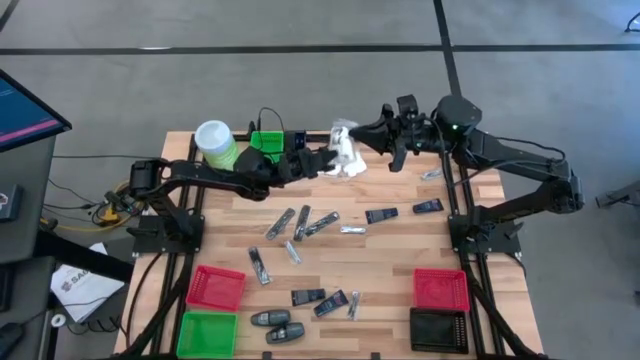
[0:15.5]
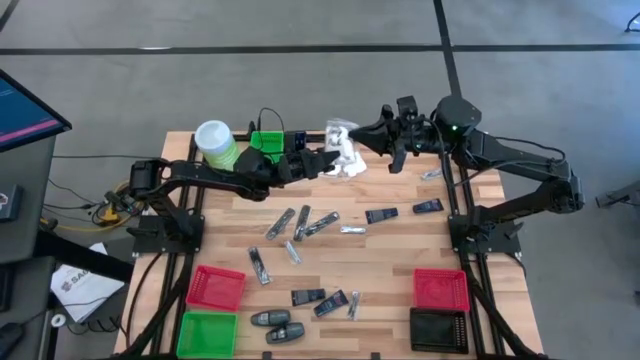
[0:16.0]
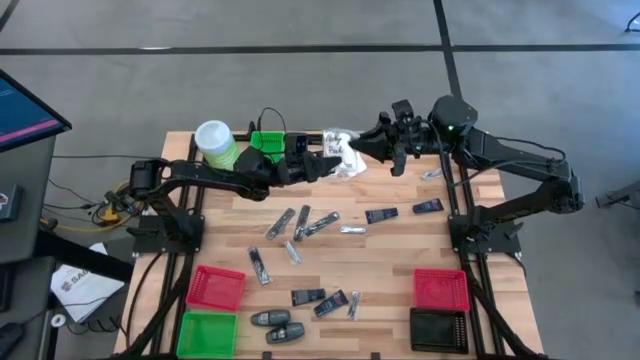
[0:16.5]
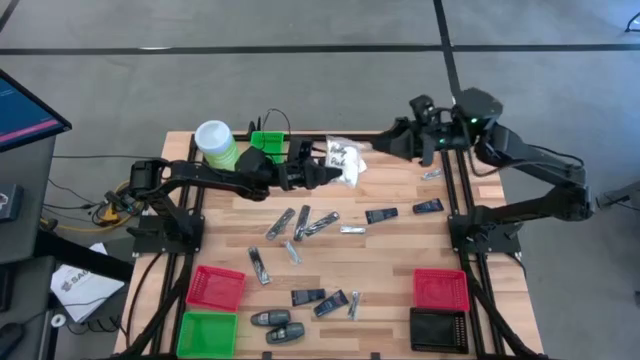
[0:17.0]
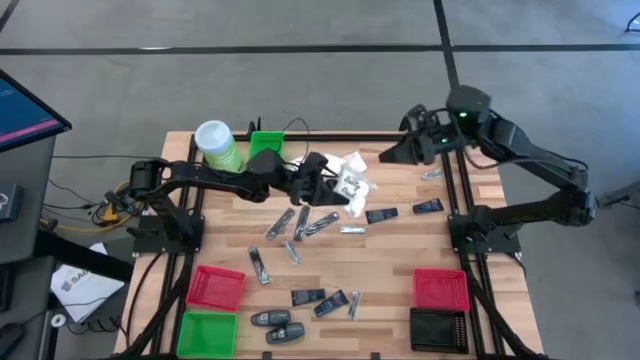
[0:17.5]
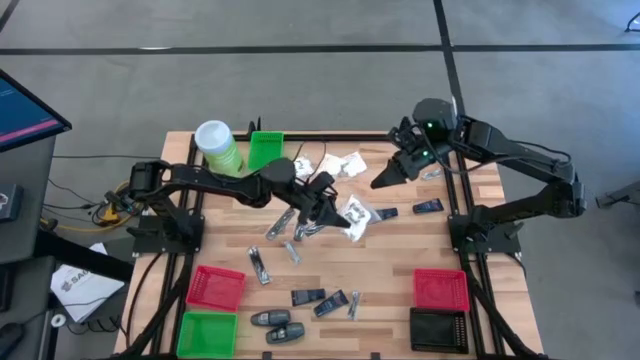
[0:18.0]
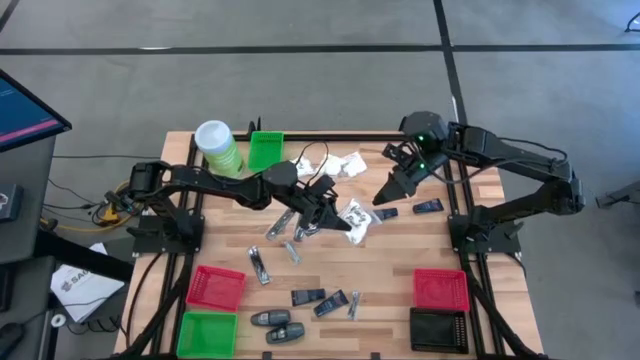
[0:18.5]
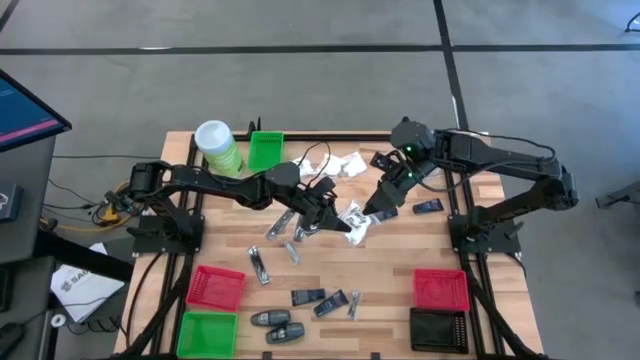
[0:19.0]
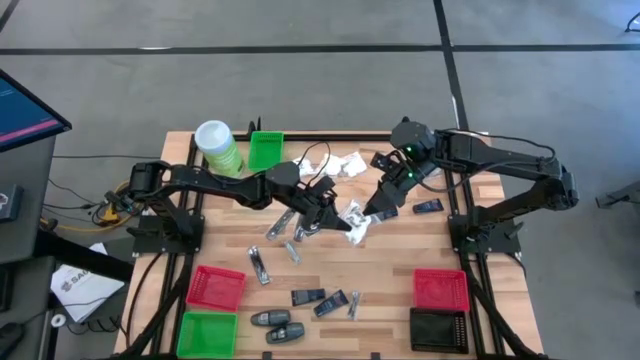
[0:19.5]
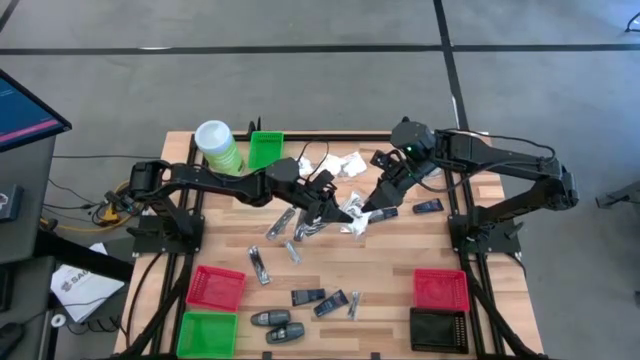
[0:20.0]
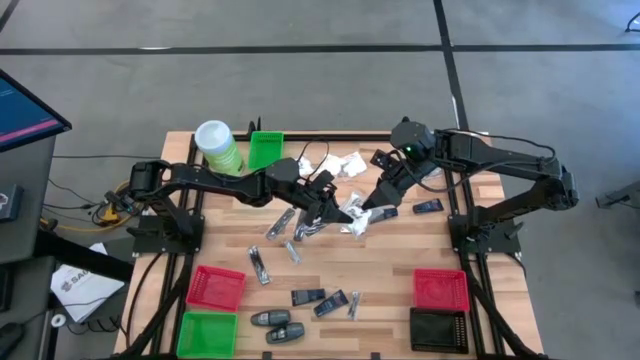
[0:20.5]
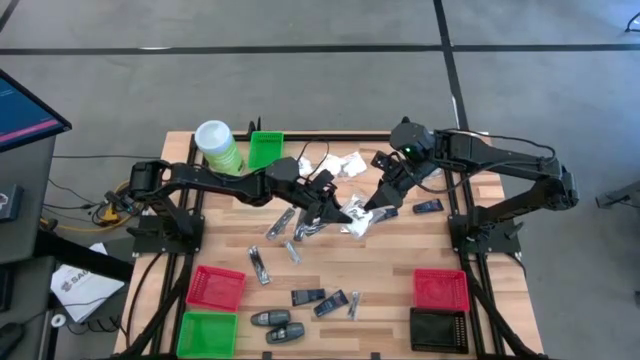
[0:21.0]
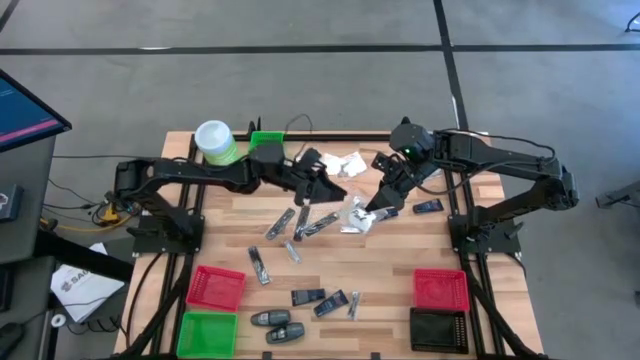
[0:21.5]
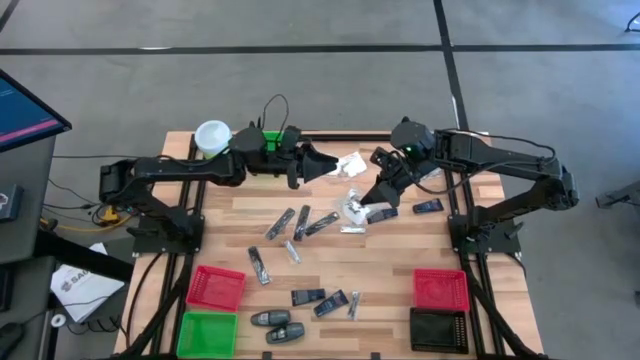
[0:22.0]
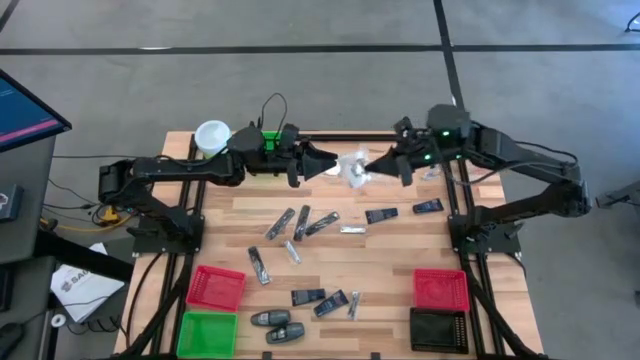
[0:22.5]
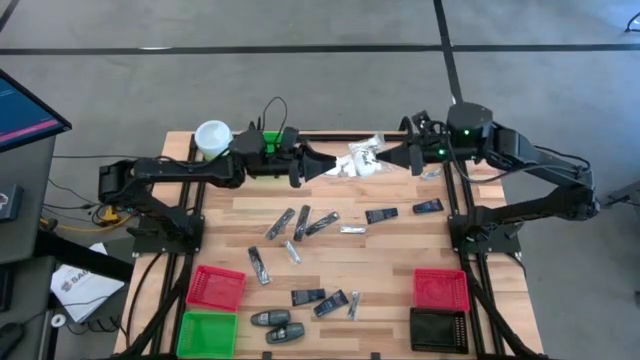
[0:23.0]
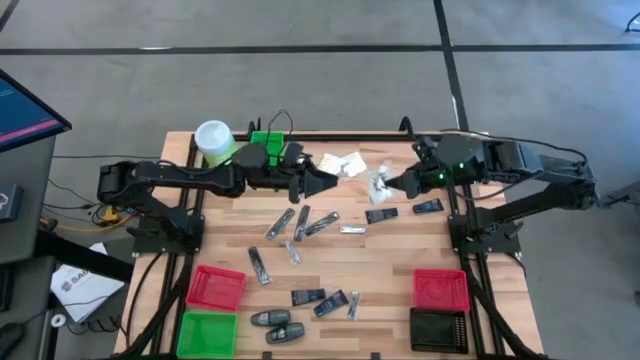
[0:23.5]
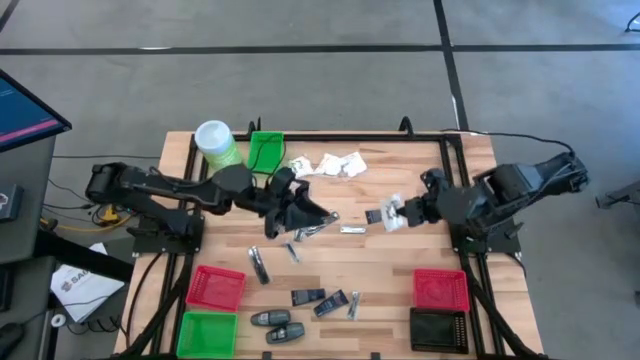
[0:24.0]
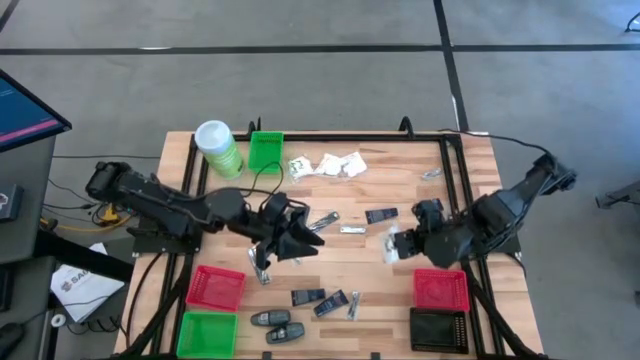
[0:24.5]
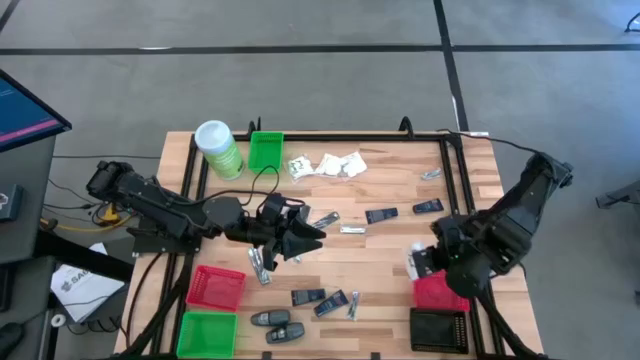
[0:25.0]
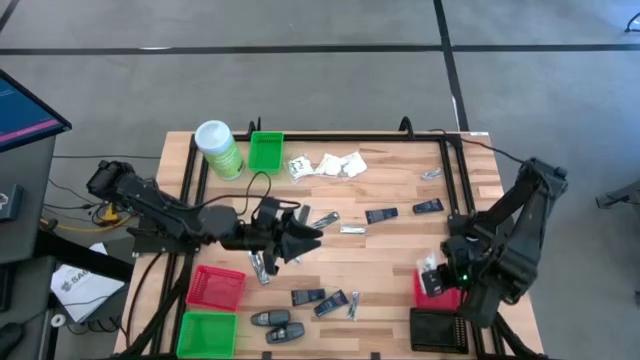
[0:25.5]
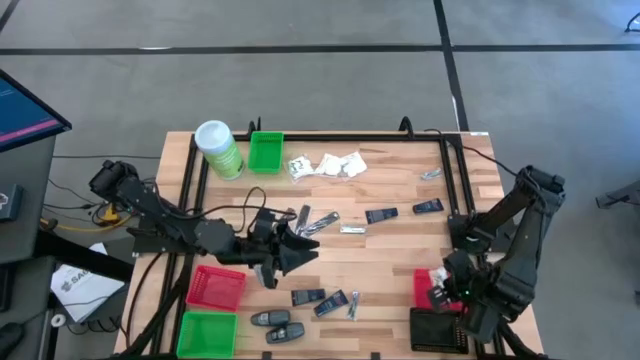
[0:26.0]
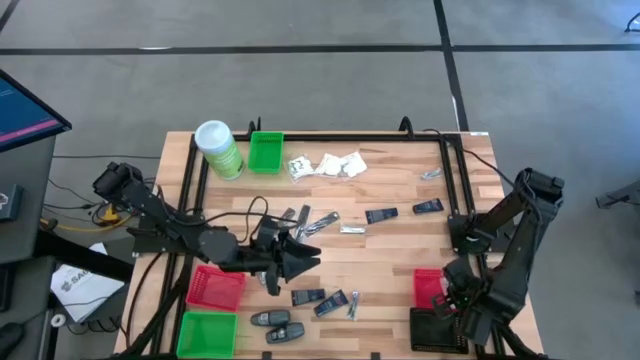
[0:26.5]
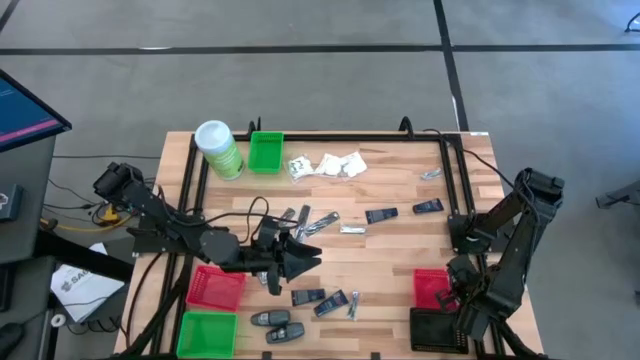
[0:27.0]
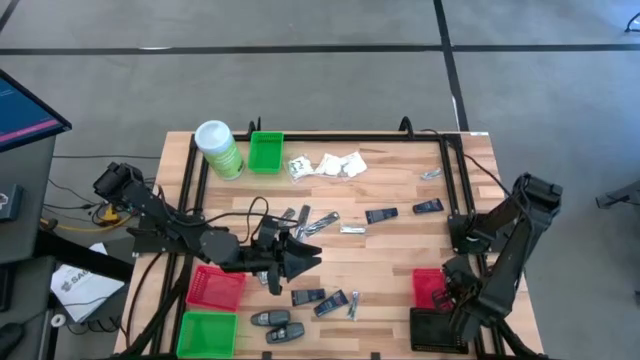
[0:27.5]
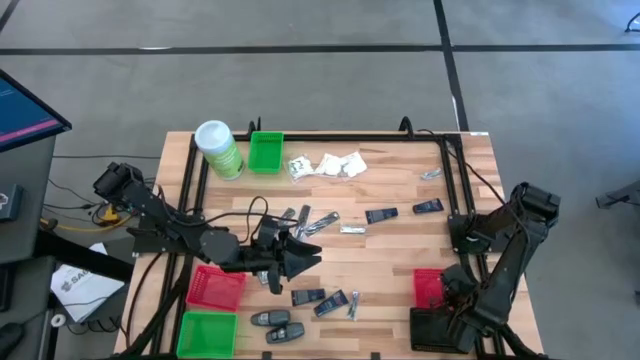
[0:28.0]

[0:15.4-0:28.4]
Task: Pick & Place Travel size toiletries
Put the cotton pack into the right red bin

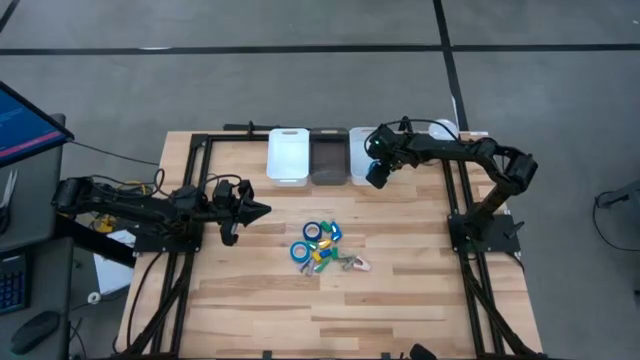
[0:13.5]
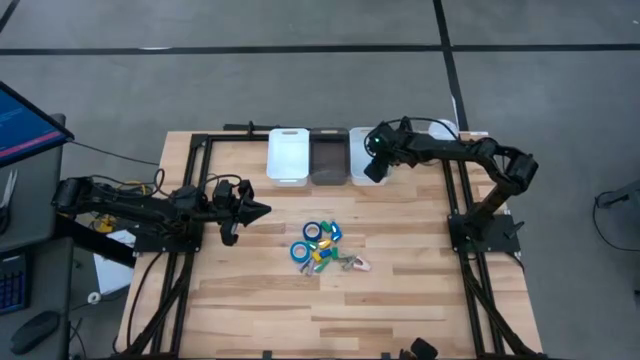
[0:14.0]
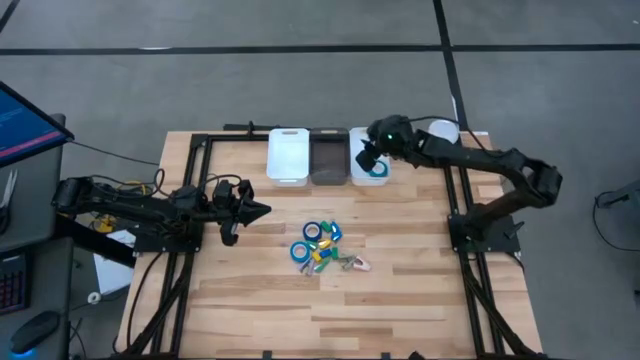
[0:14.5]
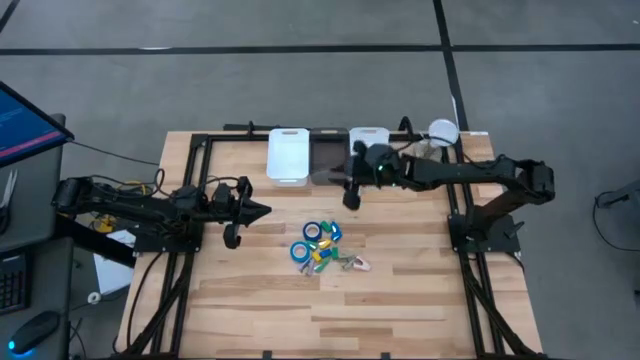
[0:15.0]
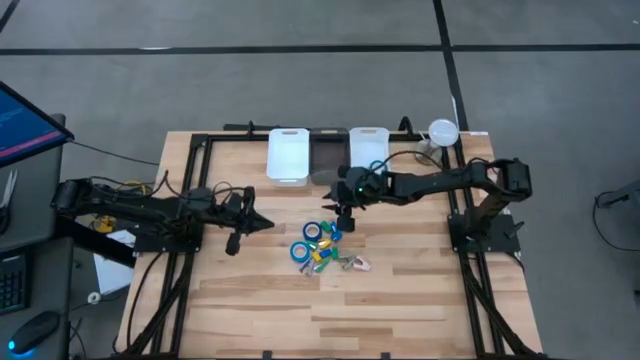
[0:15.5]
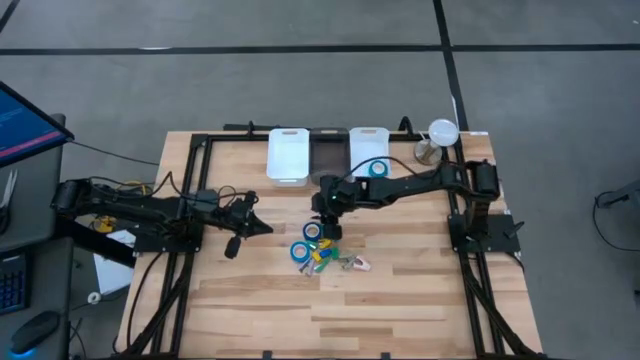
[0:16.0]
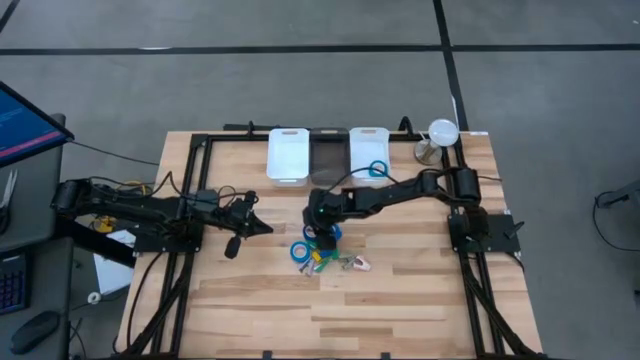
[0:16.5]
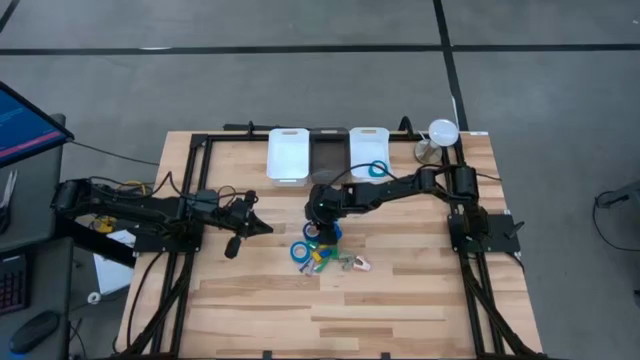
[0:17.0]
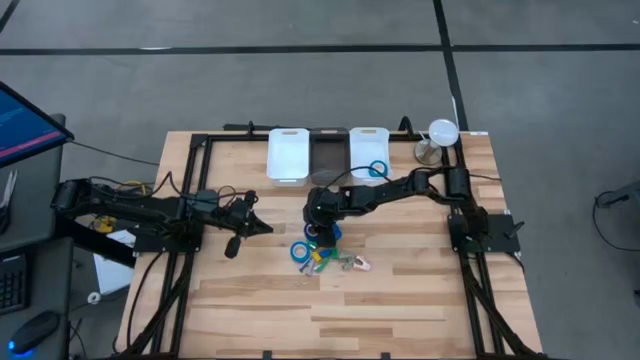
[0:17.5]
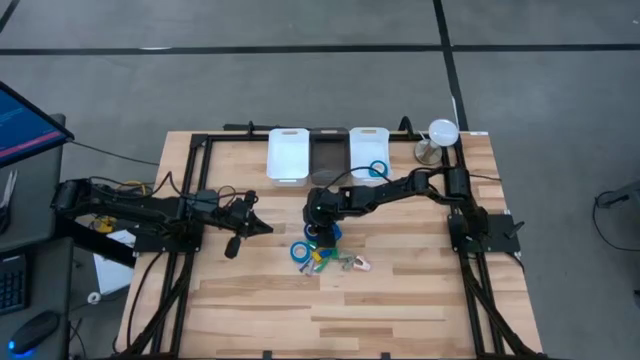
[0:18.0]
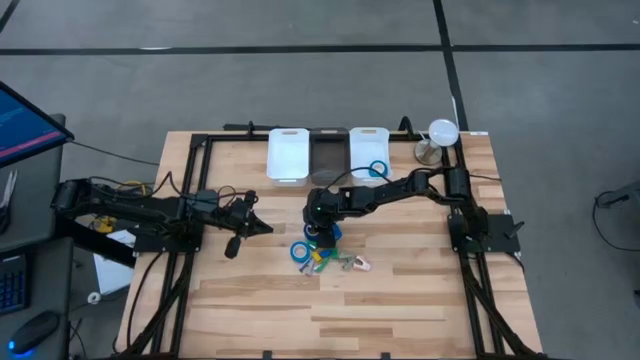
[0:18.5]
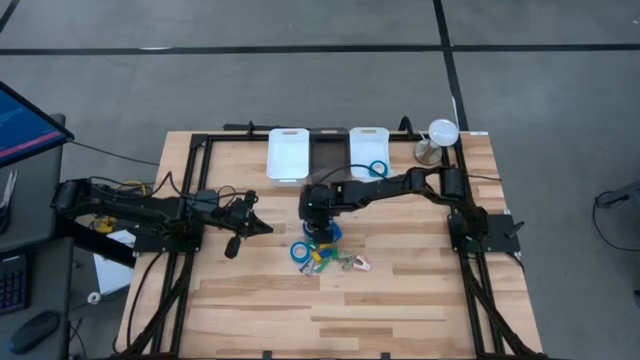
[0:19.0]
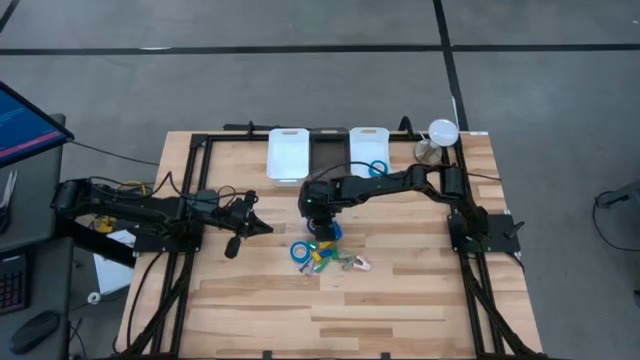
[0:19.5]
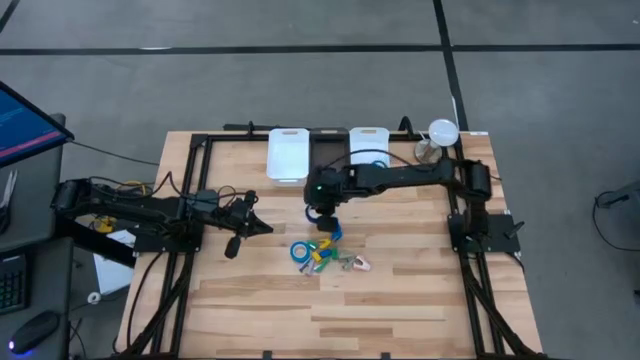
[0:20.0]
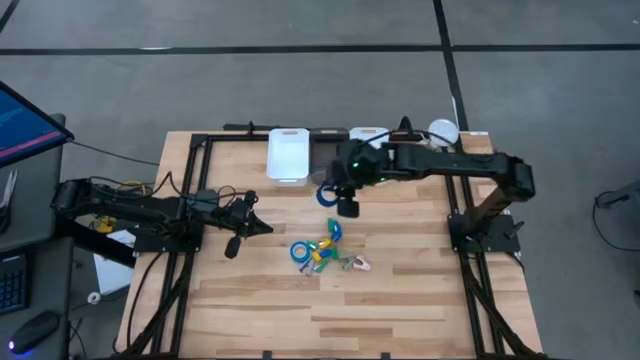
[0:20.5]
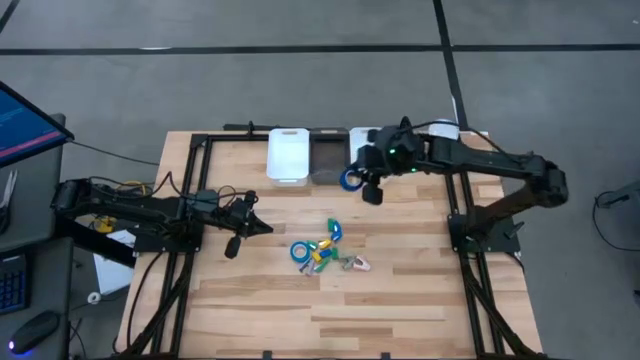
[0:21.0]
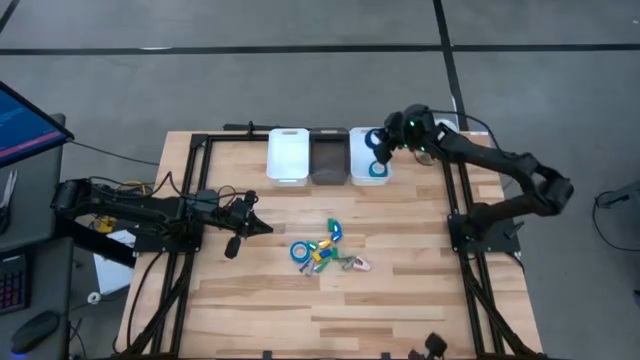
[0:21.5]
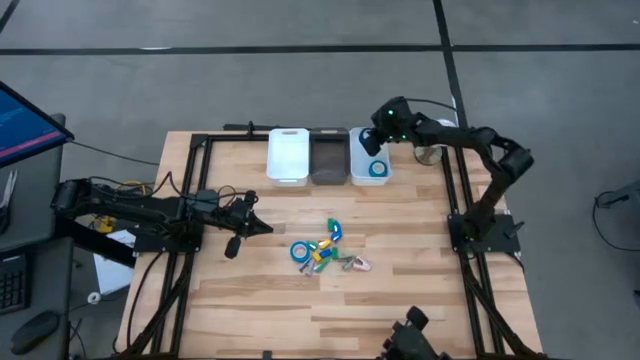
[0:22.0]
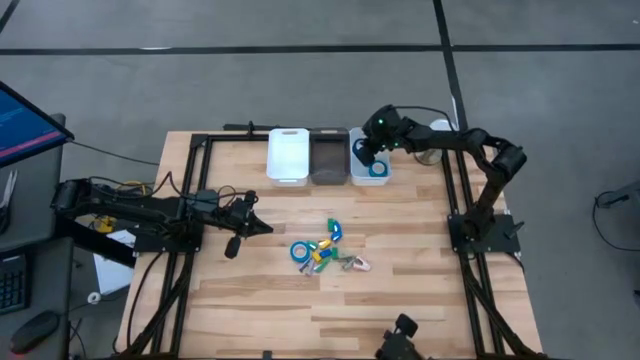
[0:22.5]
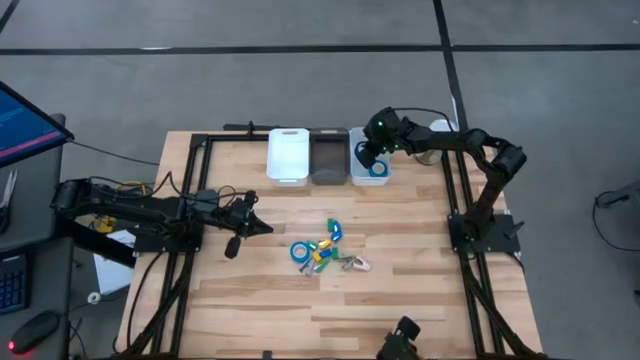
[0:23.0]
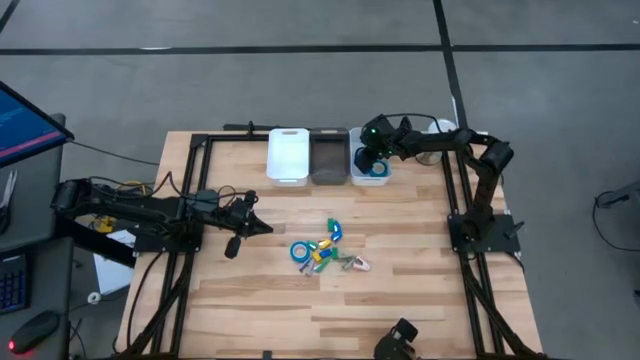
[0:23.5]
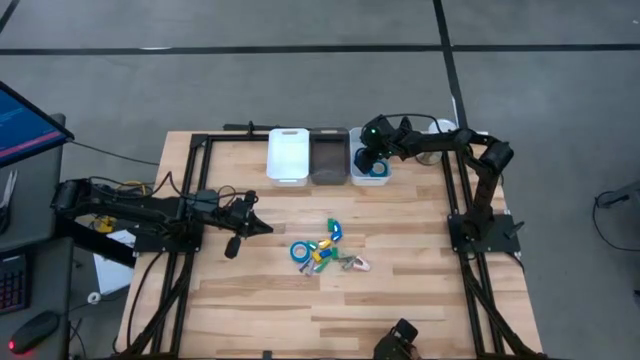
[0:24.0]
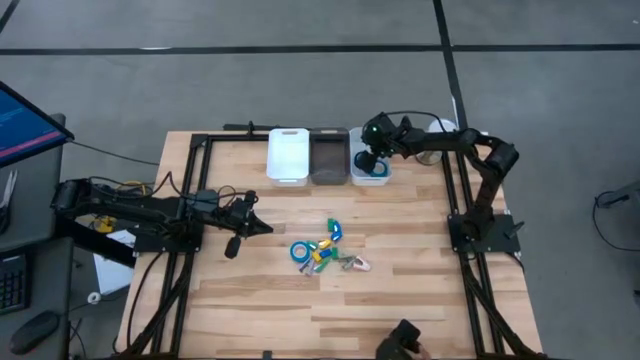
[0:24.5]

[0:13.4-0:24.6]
Task: Pick and place Stapler, Stapler remover, tape
Put the dark blue tape into the right white bin
